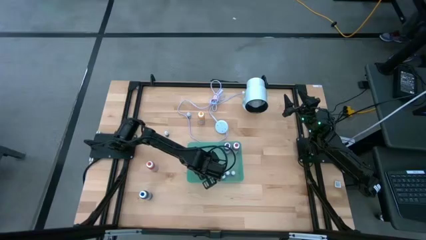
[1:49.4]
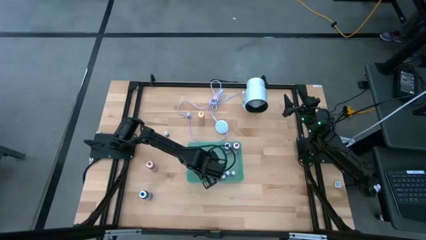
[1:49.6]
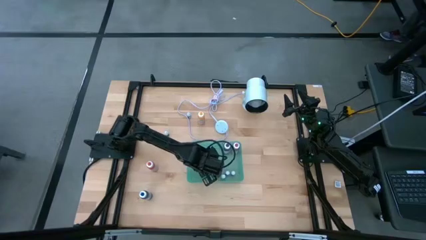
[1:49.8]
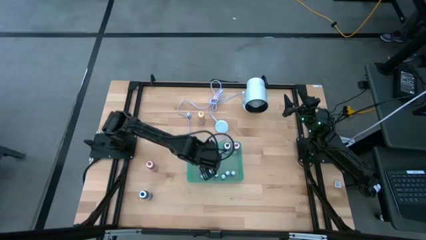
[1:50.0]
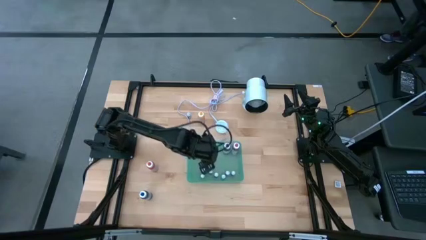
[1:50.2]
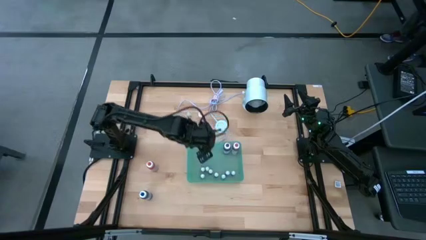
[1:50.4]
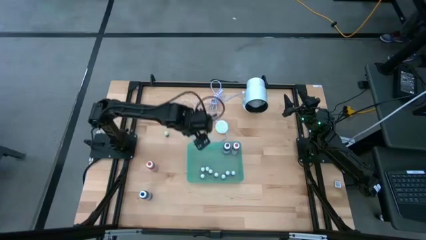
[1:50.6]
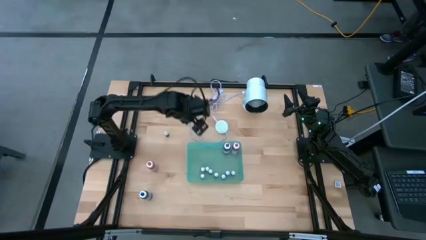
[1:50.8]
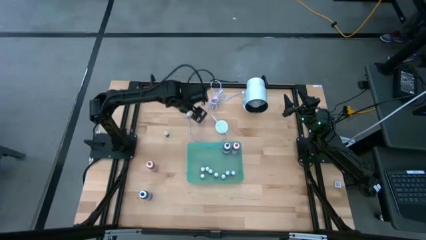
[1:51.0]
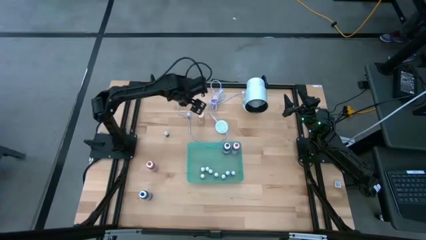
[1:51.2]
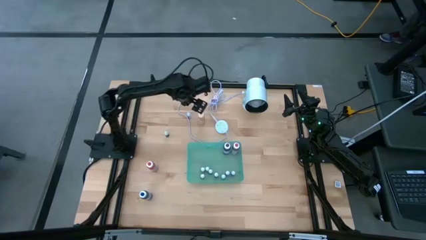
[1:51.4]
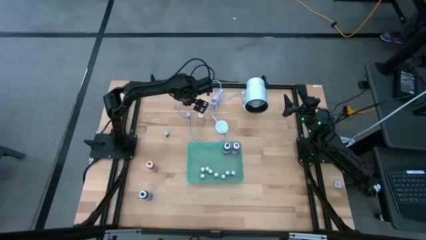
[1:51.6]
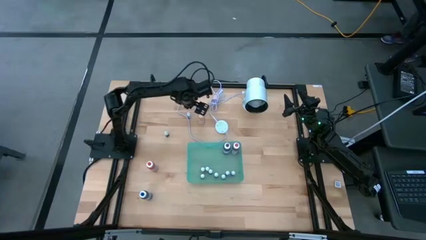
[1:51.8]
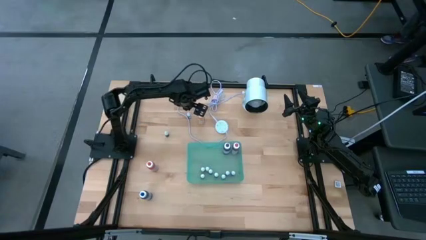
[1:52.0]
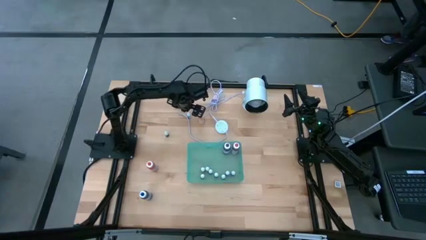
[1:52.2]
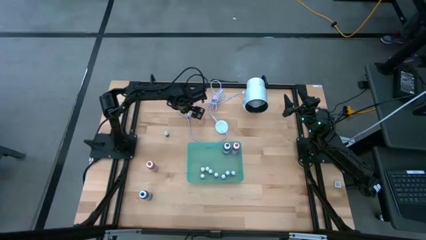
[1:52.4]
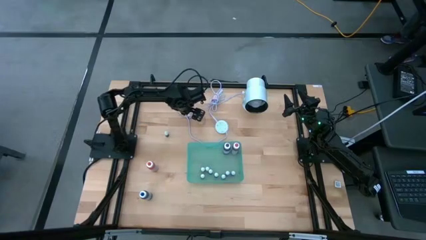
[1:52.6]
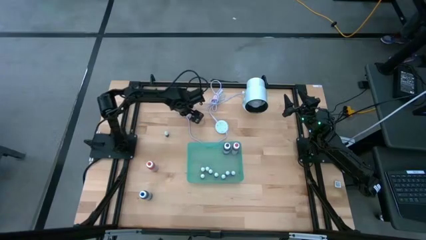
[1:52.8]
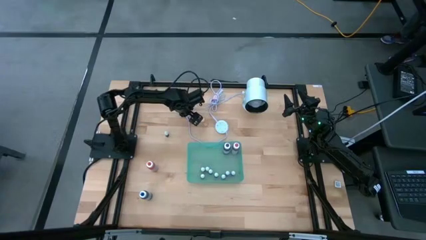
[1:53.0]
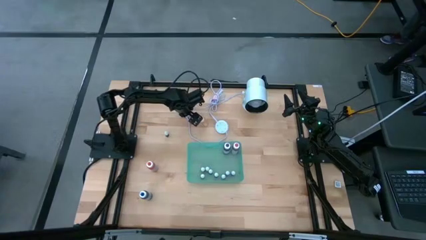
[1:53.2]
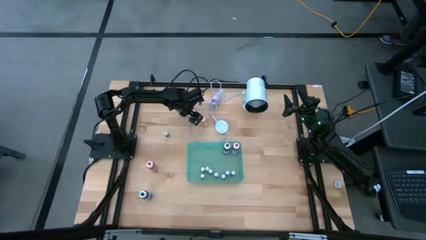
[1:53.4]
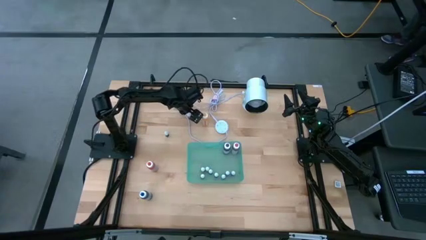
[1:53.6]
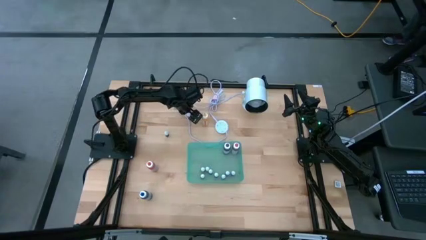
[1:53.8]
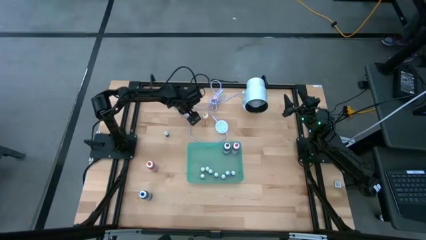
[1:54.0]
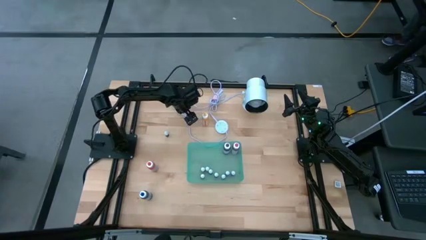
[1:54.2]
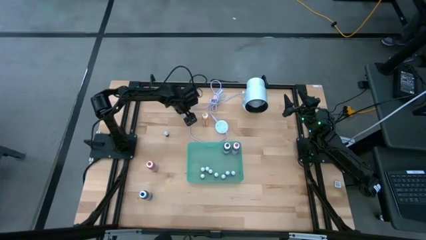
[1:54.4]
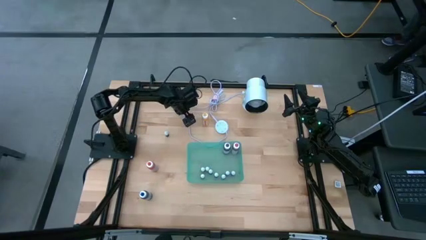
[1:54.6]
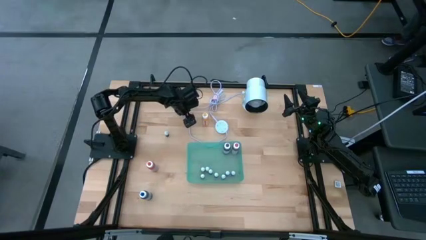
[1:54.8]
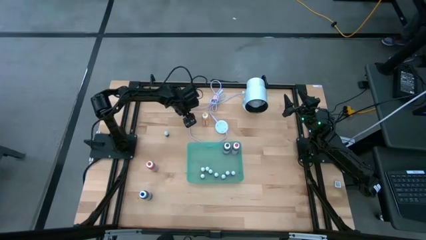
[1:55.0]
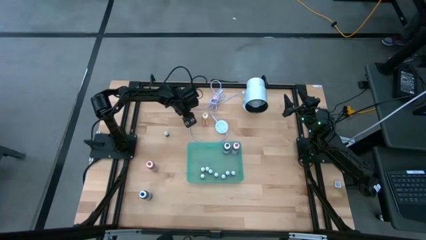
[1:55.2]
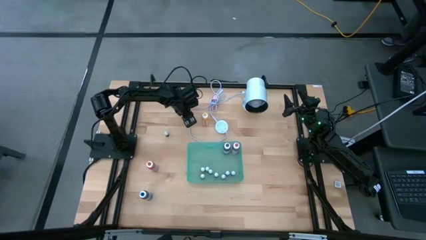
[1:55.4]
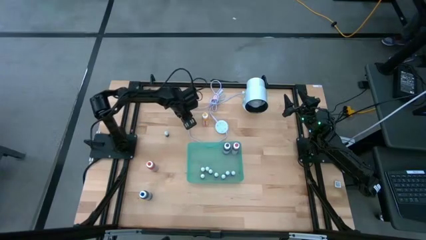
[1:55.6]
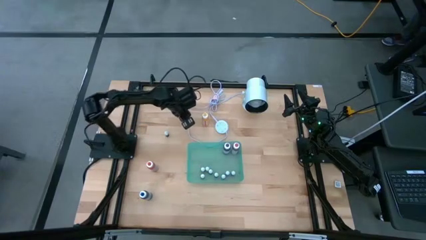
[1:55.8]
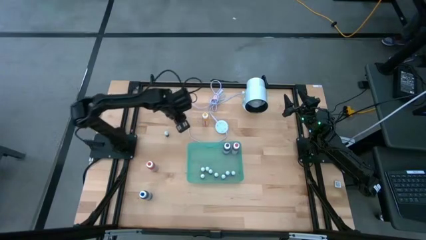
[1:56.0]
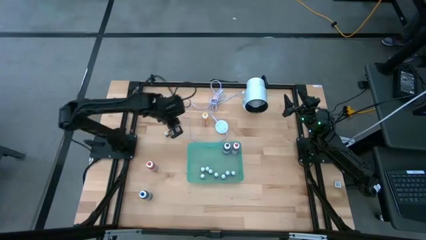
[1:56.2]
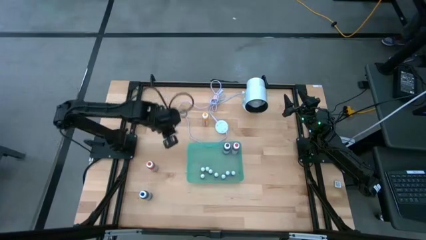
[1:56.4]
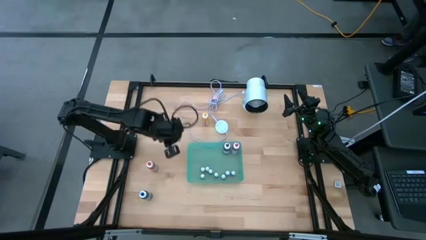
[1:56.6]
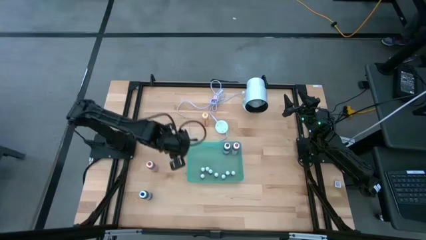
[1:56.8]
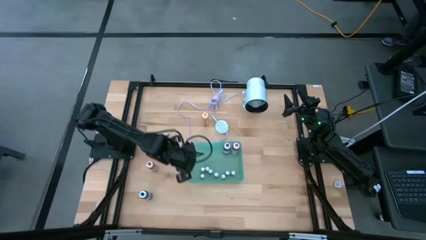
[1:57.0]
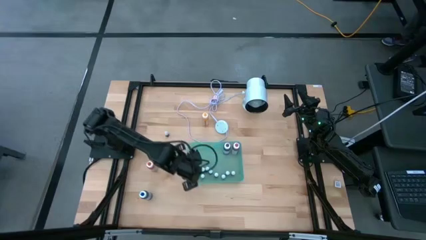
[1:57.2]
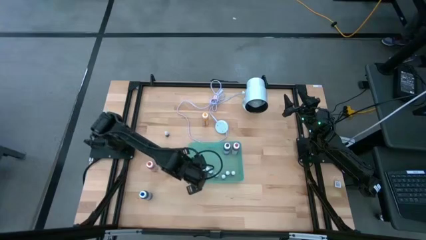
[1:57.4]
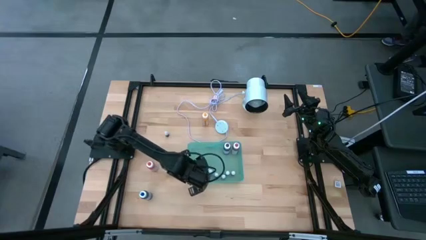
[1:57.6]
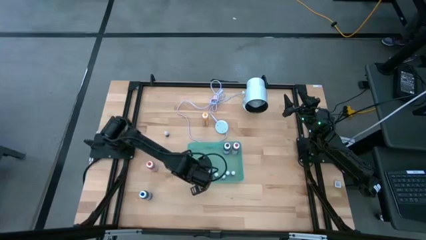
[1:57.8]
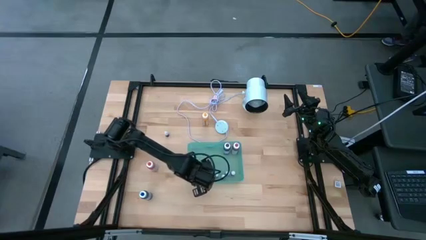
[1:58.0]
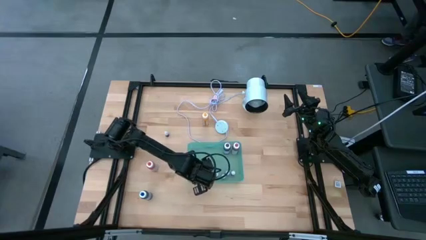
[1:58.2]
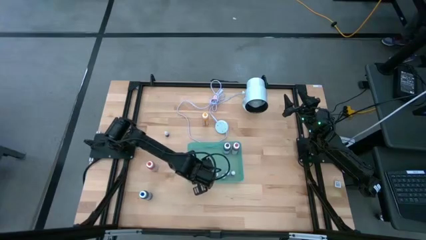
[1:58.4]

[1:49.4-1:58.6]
Task: Pick & Place food coloring
Put the small blue food coloring bottle into the bin

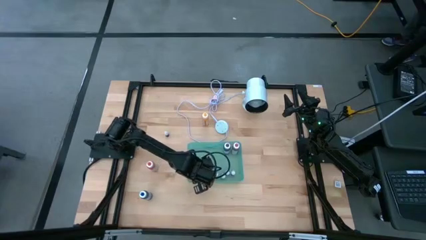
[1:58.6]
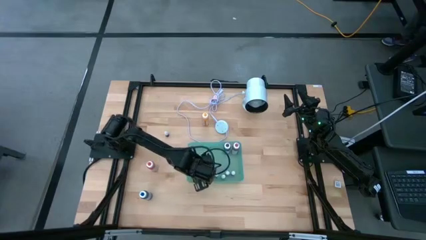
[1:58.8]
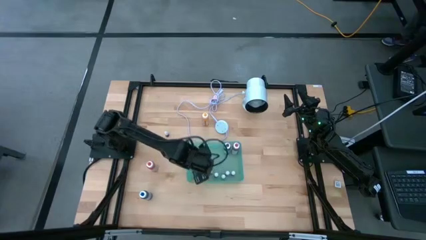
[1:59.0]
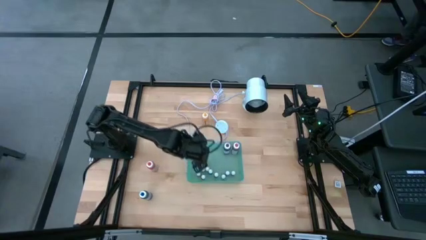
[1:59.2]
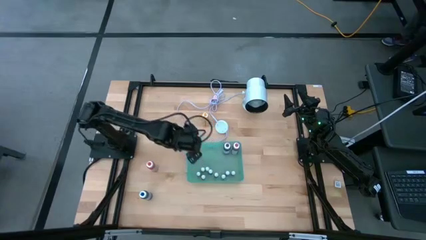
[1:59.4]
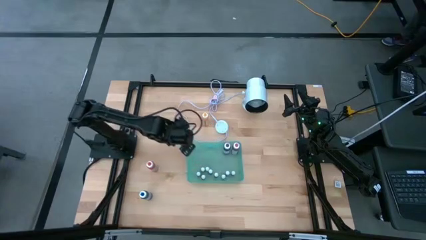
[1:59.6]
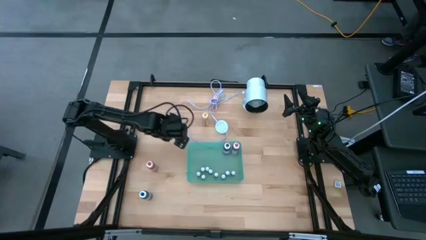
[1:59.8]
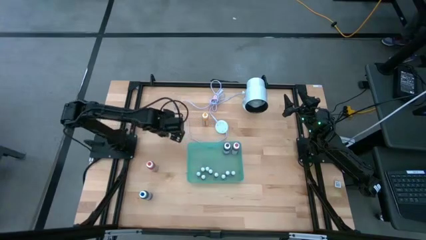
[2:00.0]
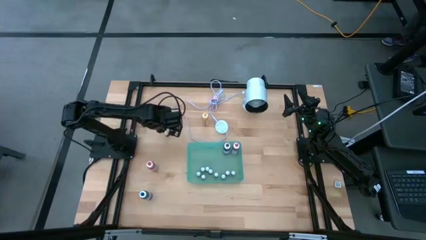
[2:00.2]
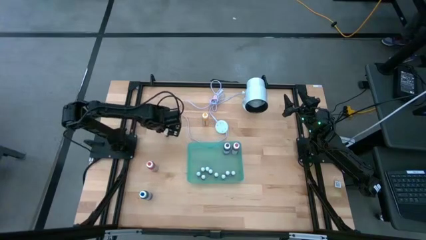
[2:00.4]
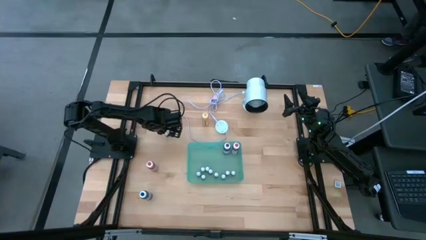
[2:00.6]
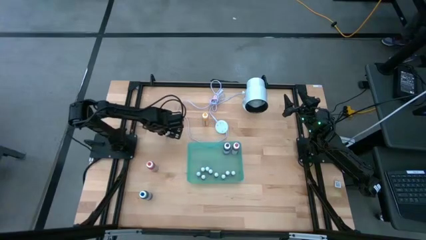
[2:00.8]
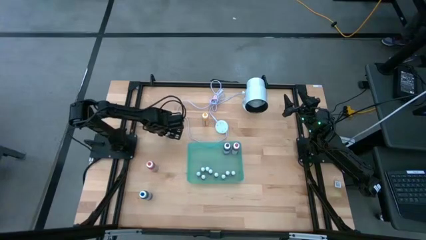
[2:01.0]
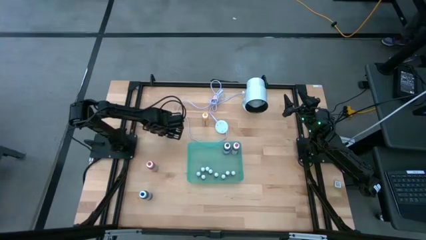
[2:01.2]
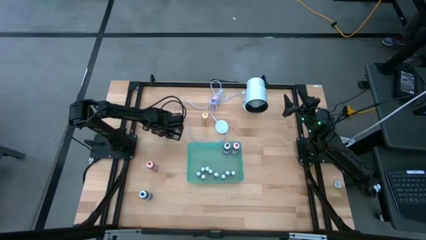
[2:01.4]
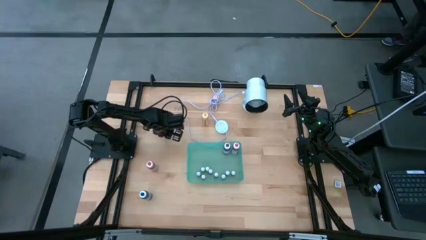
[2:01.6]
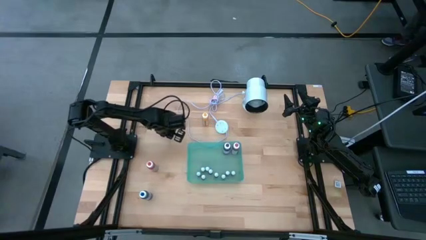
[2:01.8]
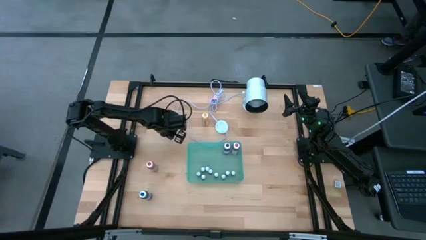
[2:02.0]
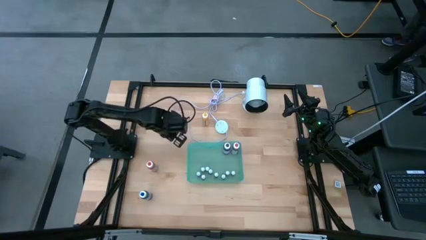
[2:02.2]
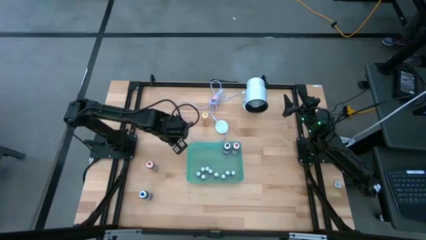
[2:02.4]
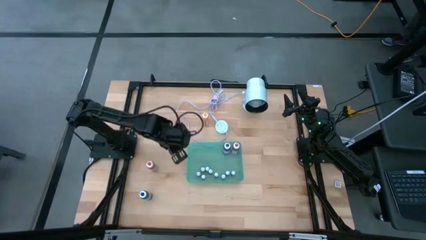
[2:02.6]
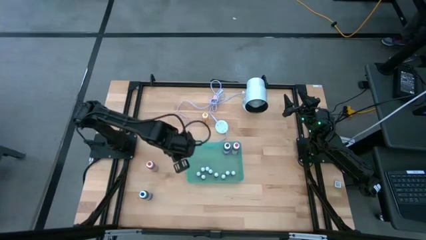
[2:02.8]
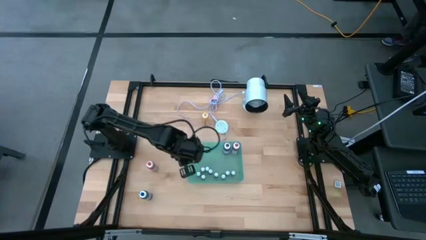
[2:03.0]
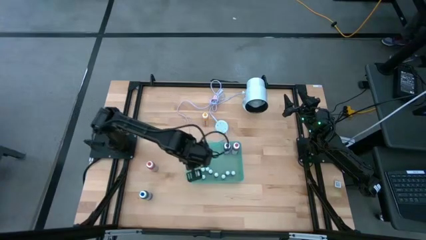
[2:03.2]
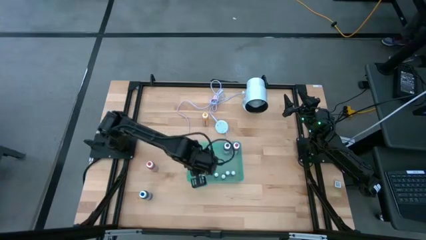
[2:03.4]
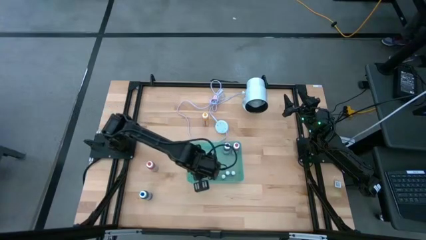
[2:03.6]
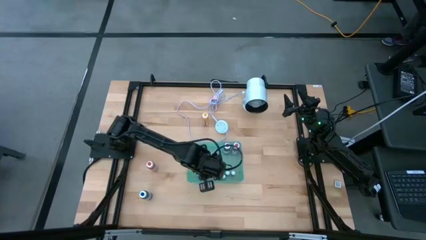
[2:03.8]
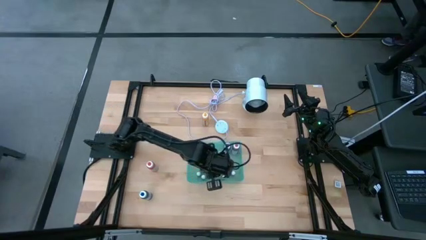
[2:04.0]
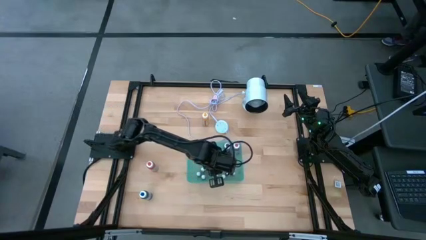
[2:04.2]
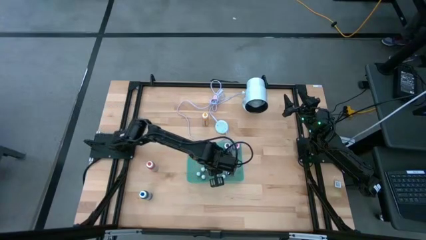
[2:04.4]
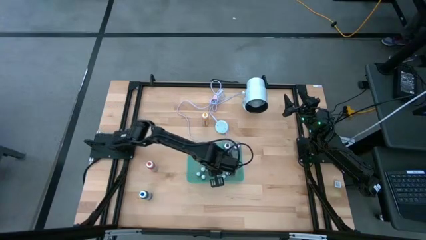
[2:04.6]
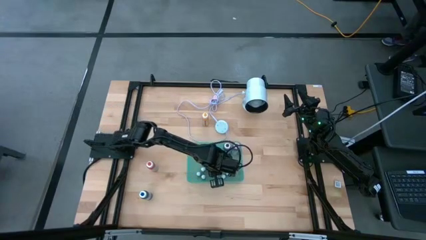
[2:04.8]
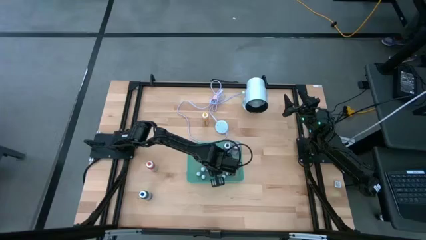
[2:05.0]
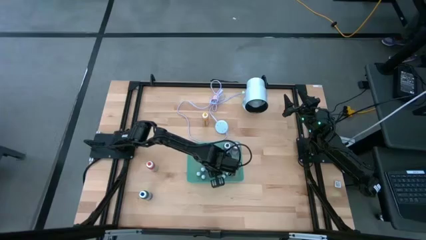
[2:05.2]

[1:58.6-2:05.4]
Put the small green food coloring bottle into the bin
